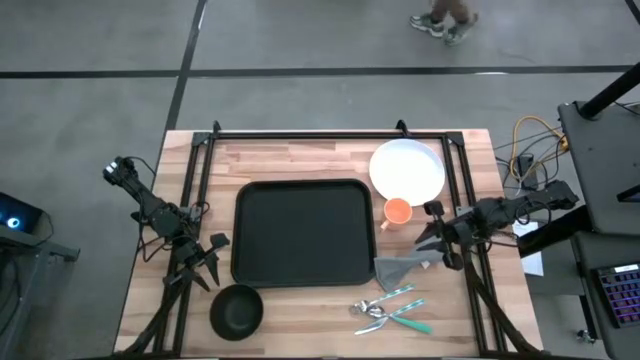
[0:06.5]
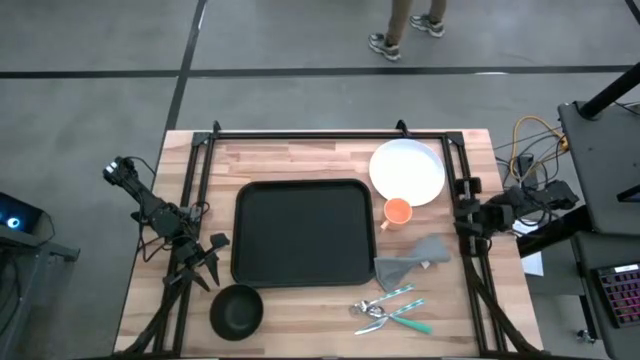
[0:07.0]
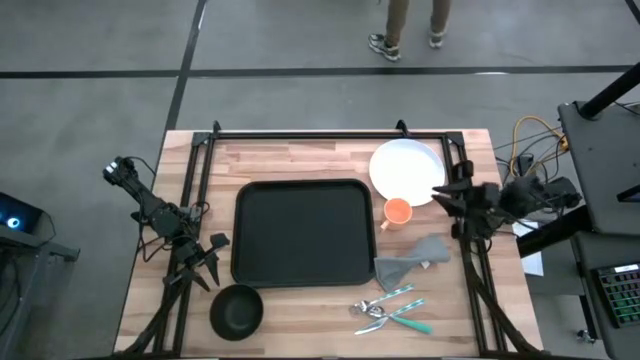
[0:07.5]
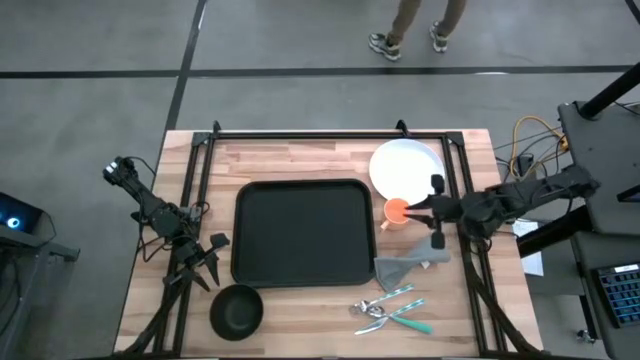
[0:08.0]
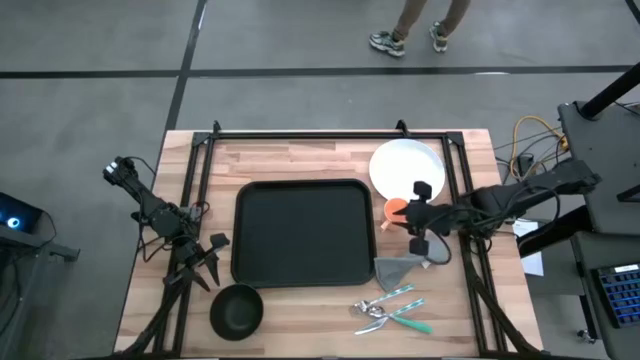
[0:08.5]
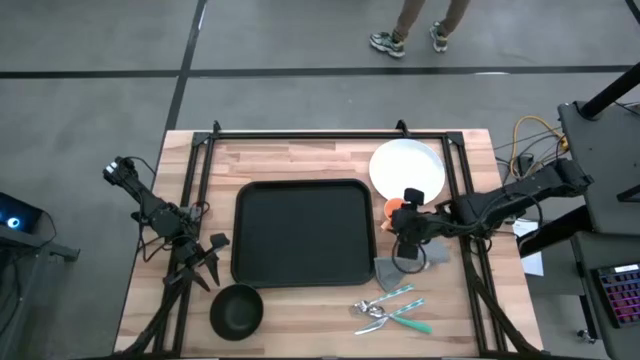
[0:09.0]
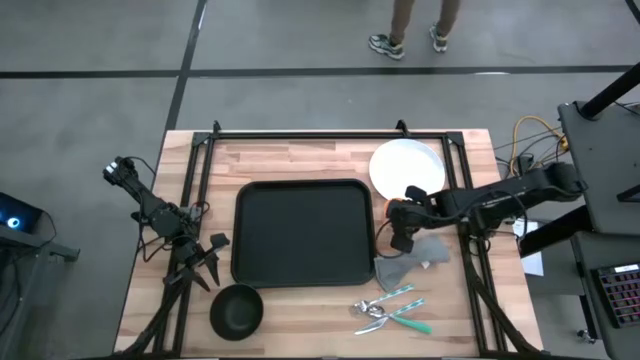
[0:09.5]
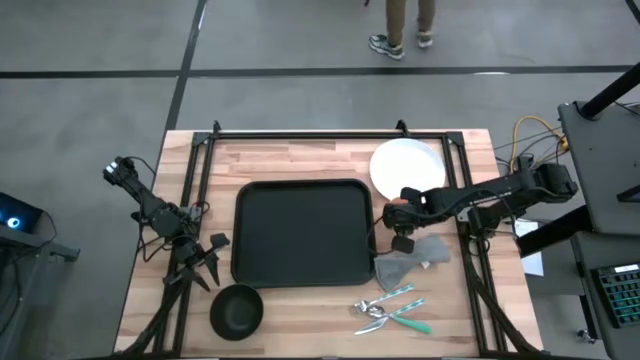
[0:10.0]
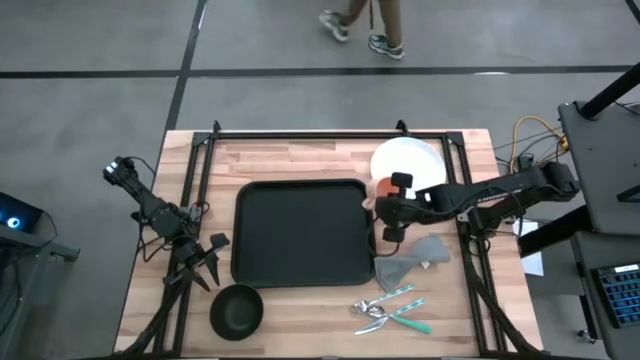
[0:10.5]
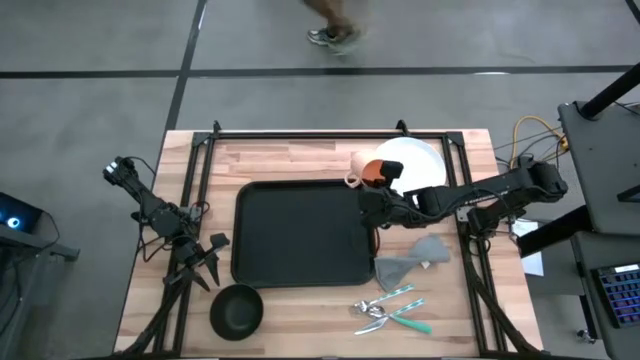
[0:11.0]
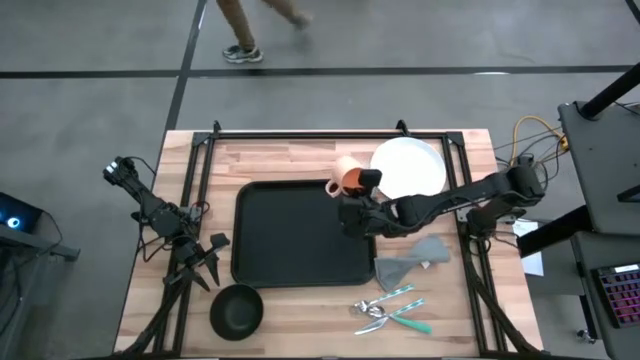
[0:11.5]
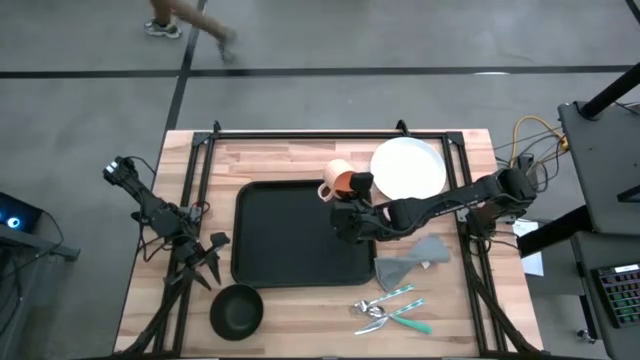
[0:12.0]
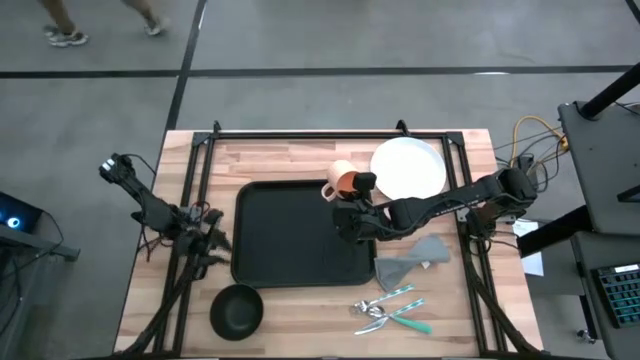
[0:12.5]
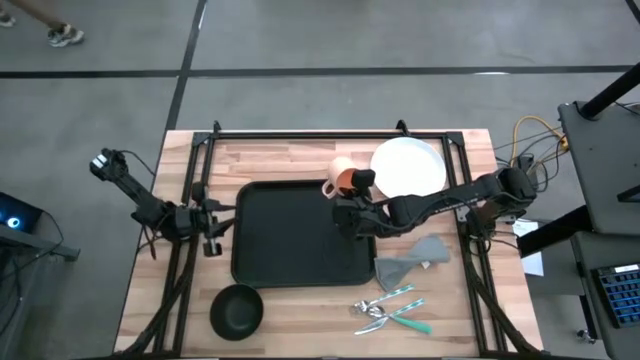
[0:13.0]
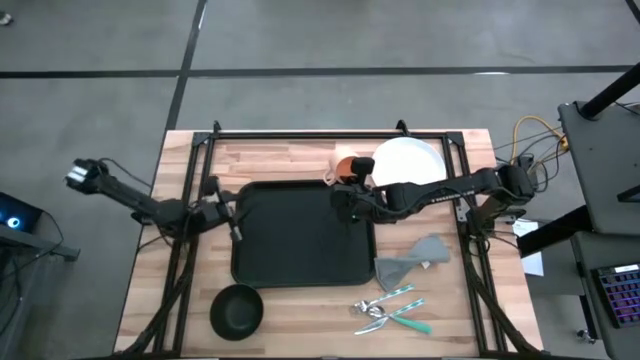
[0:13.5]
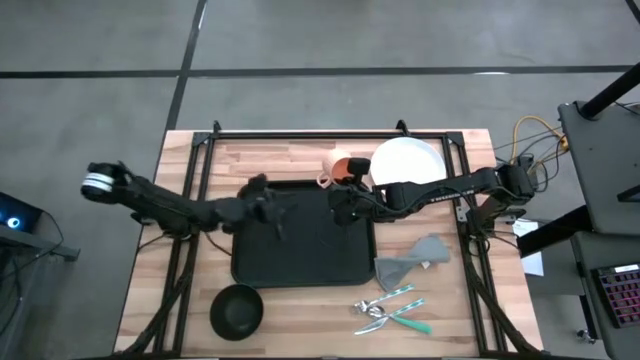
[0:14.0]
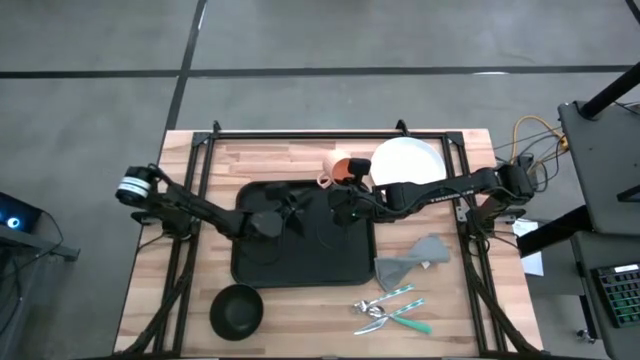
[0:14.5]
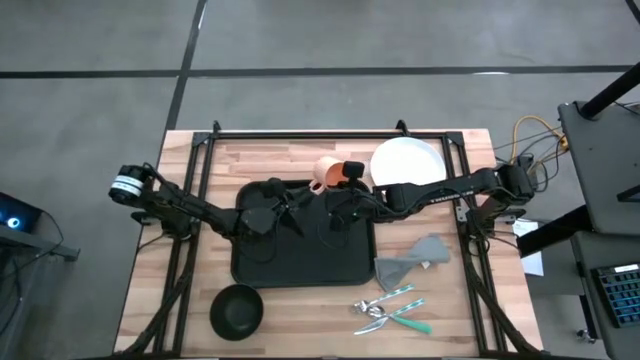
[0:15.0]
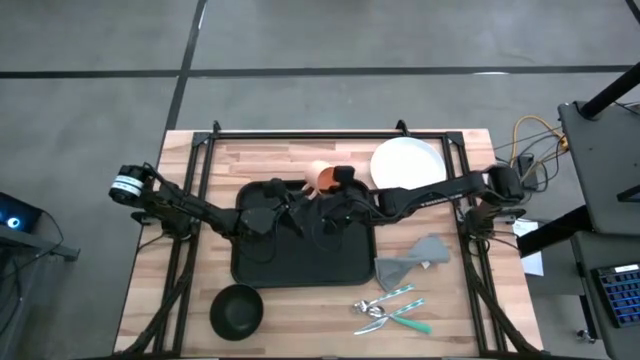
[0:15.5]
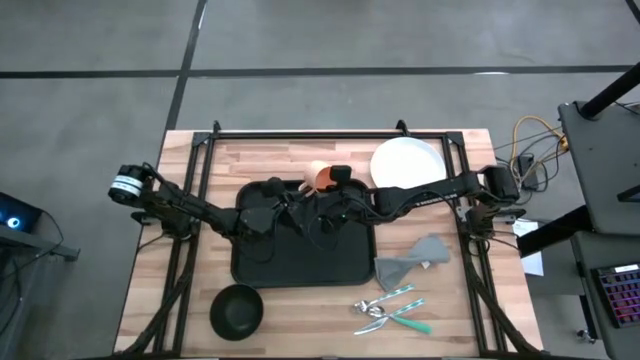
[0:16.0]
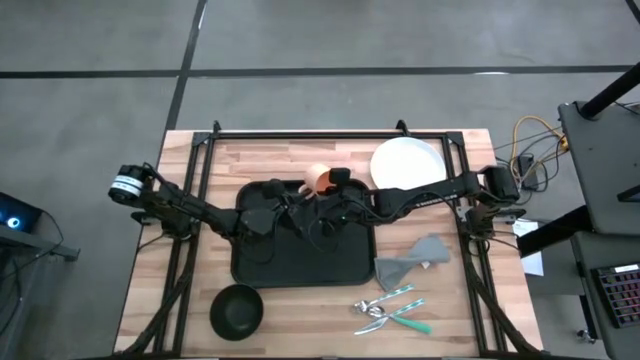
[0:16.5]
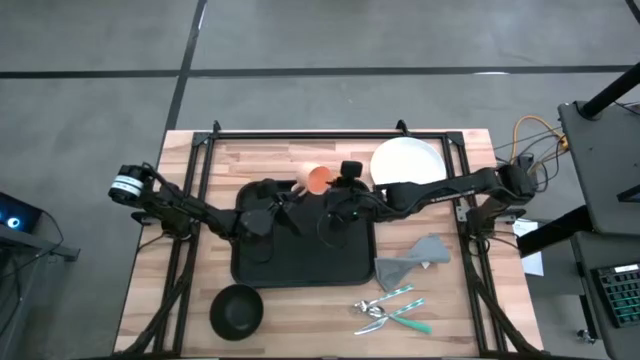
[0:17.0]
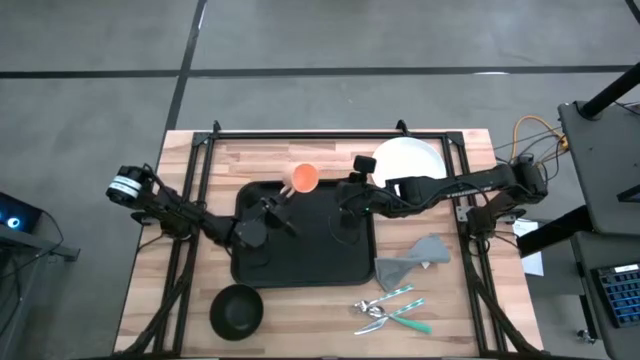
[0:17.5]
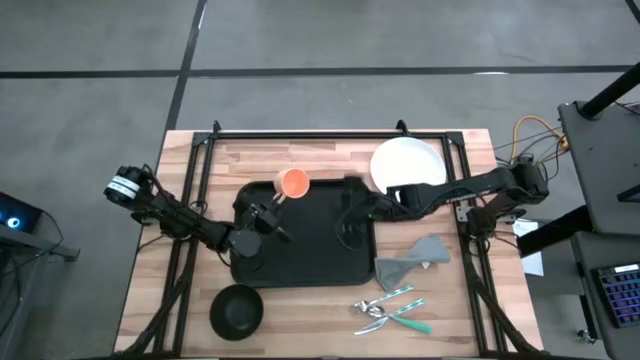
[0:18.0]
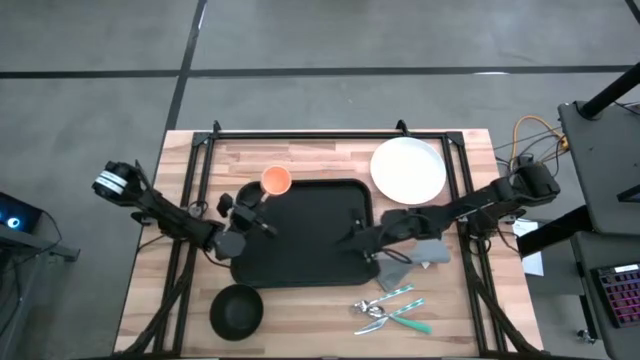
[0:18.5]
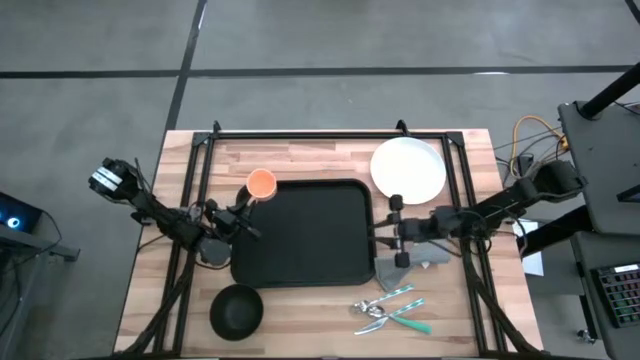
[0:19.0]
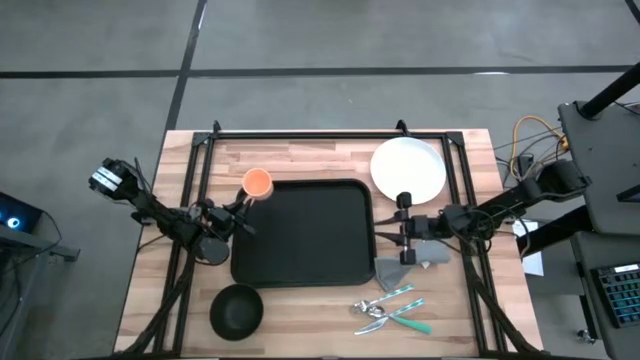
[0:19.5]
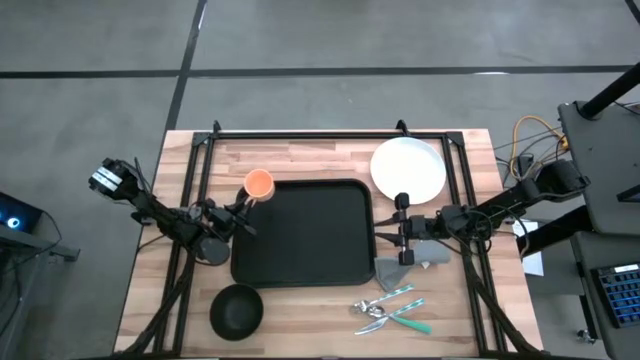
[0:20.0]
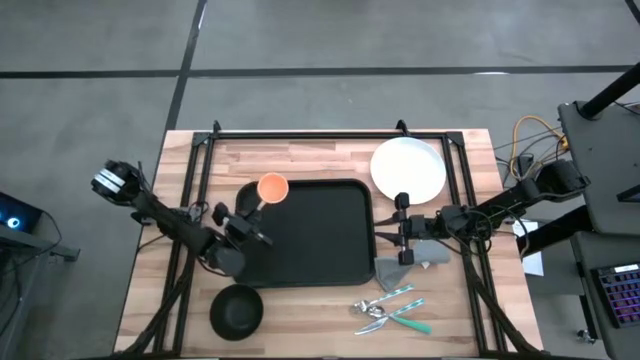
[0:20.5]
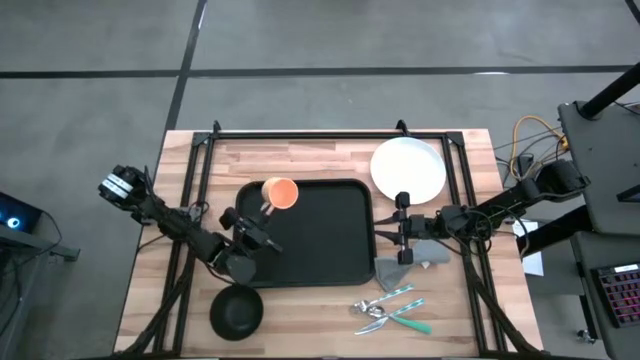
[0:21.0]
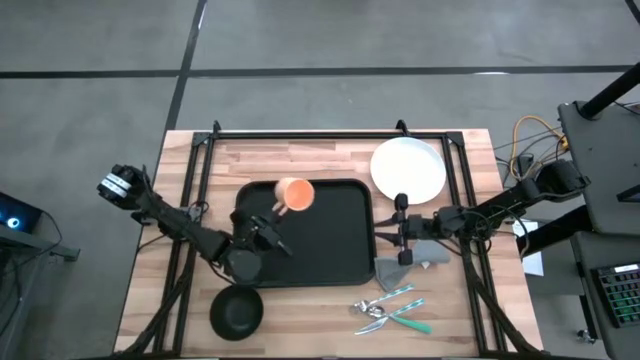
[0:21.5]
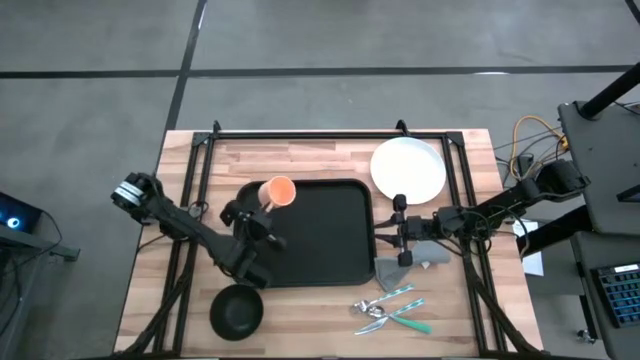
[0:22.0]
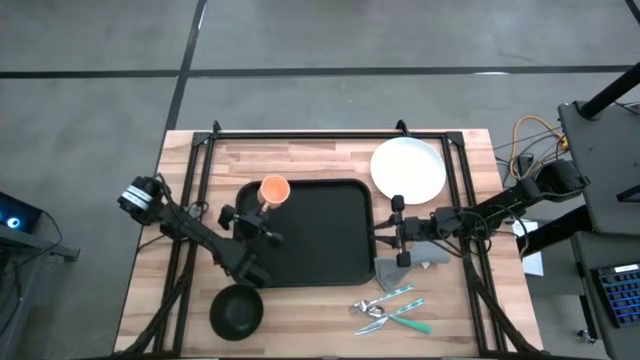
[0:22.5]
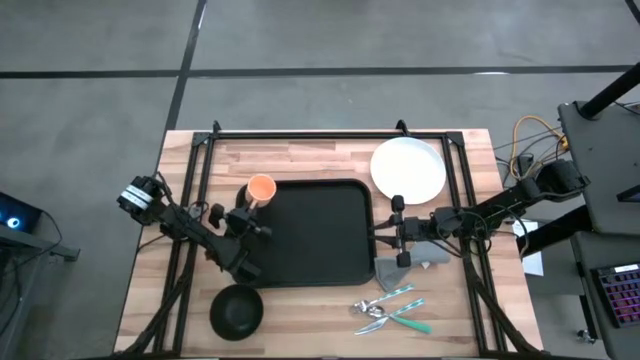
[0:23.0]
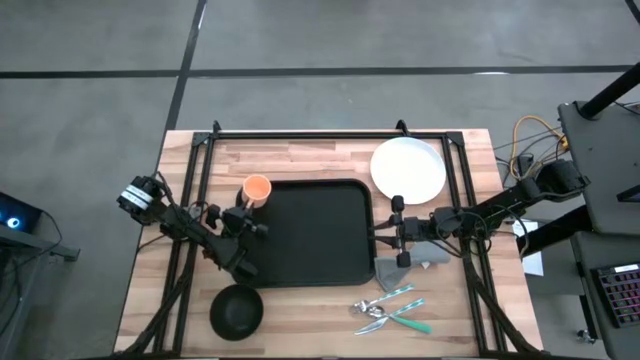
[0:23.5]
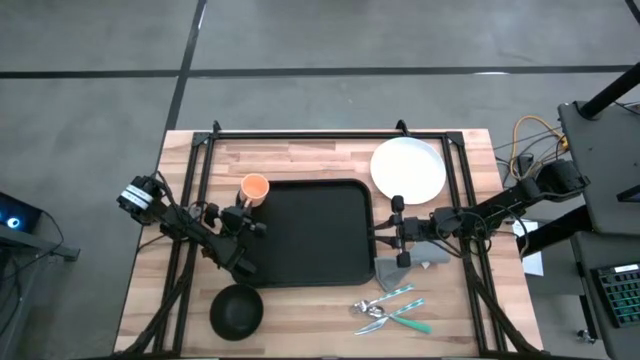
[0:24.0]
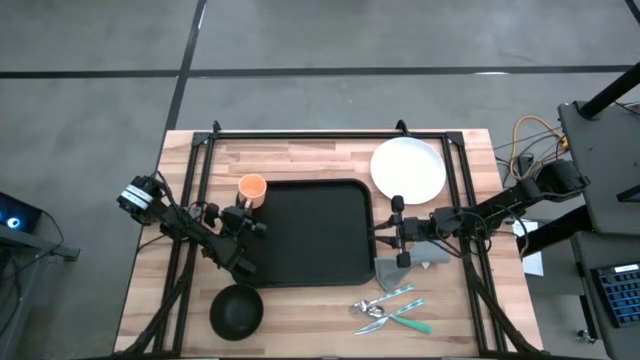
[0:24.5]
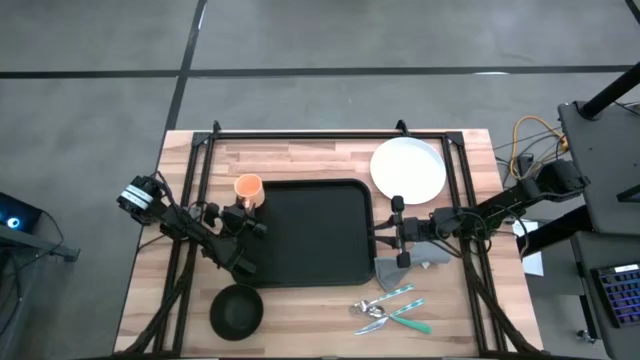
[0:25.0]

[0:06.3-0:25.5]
Task: Set up tray
Put the orange mug on the black serving tray

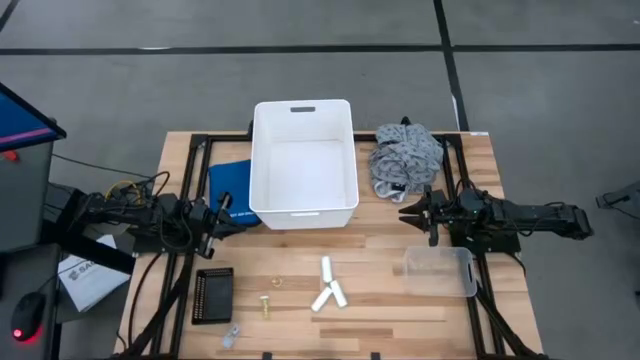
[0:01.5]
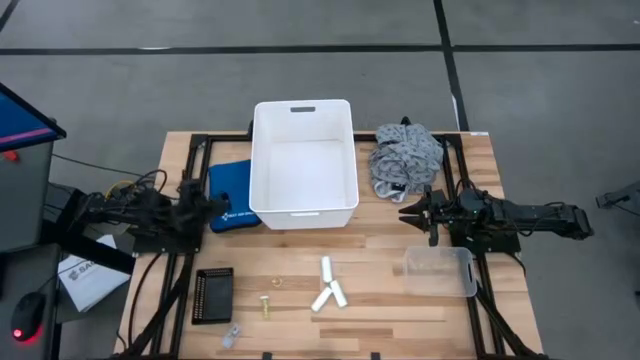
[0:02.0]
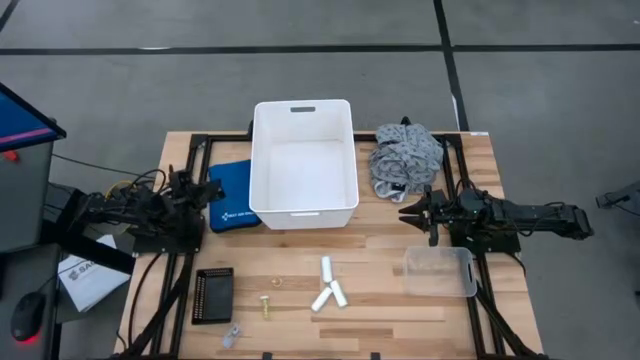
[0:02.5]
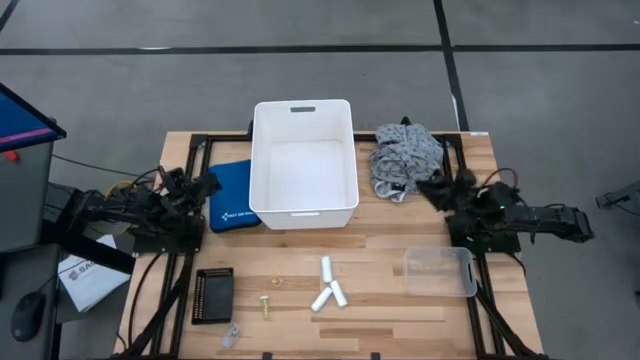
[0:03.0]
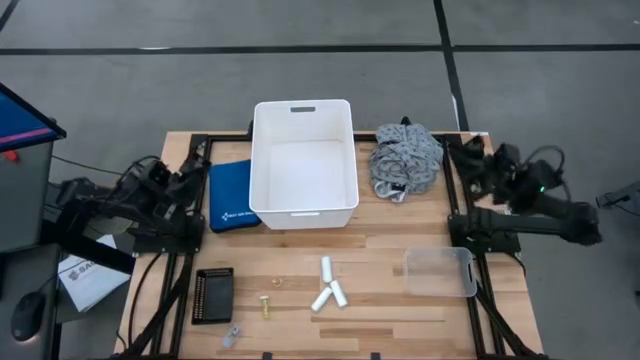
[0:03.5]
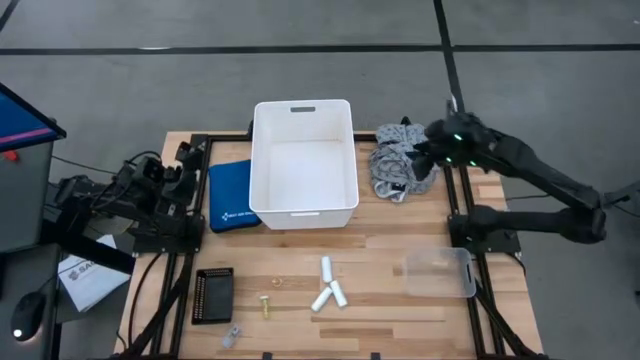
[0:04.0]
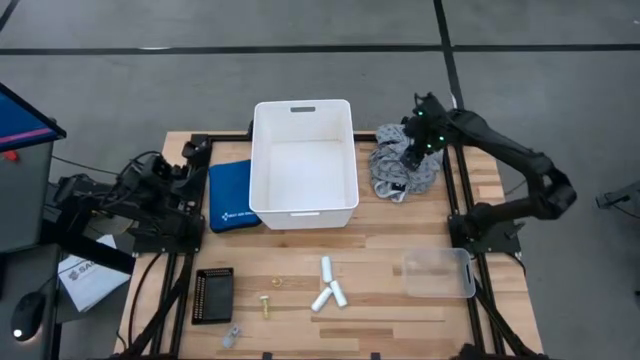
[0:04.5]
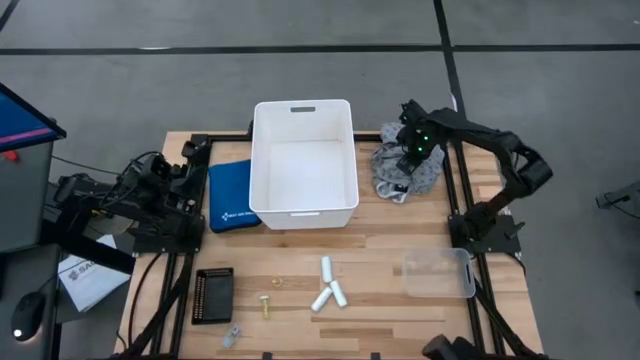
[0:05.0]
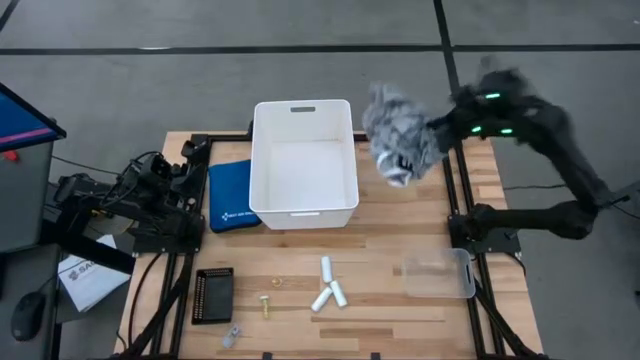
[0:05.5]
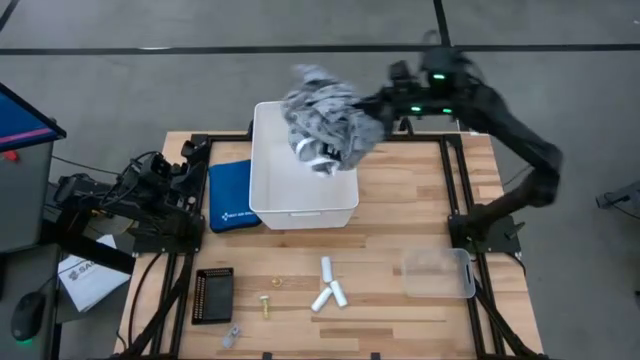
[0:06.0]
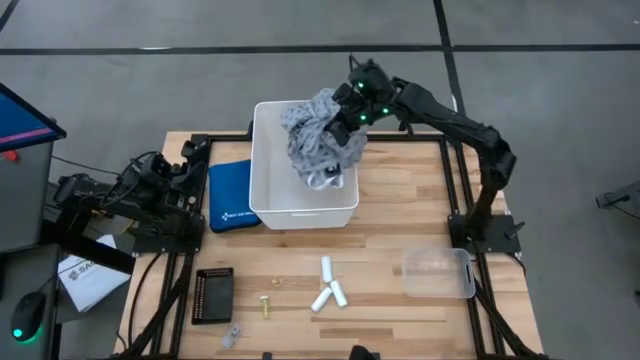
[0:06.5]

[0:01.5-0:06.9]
Task: Pick & Place Medicine items
Put the gray patient gown into the white bin
